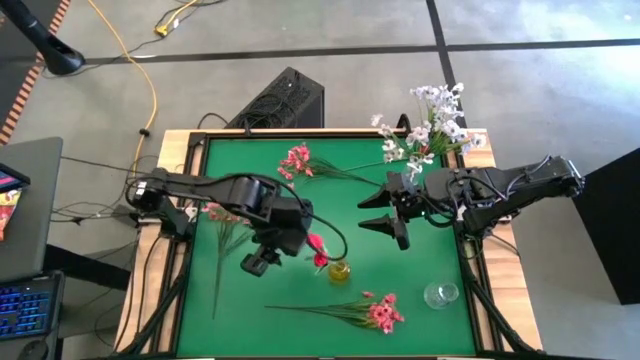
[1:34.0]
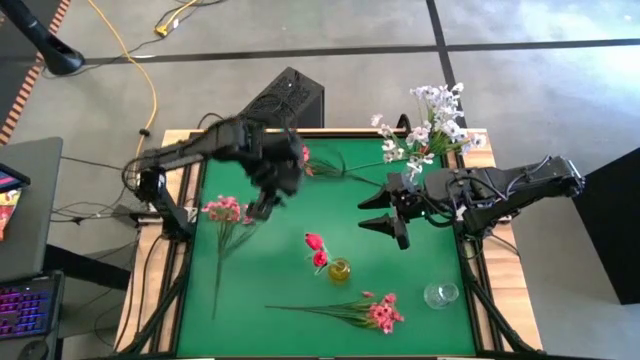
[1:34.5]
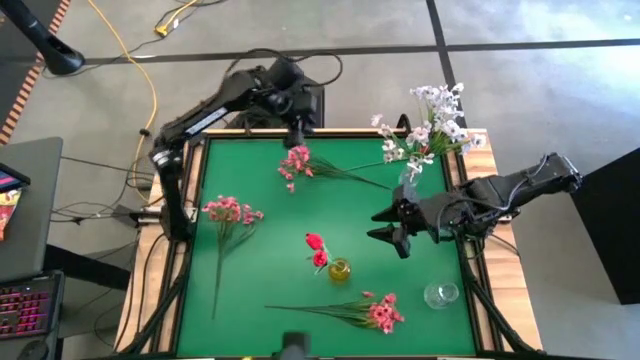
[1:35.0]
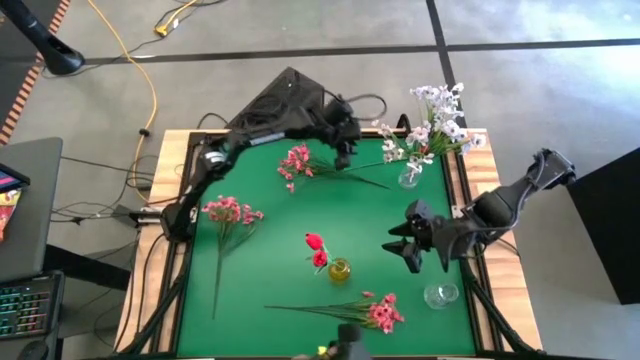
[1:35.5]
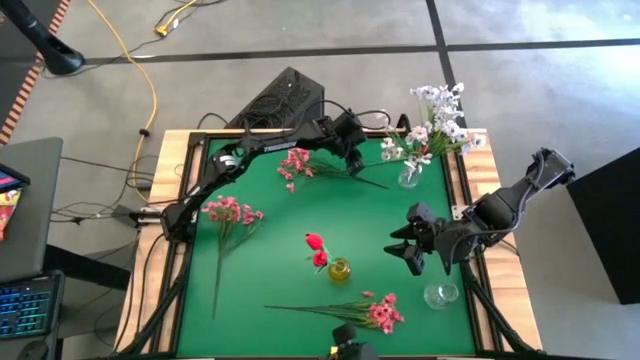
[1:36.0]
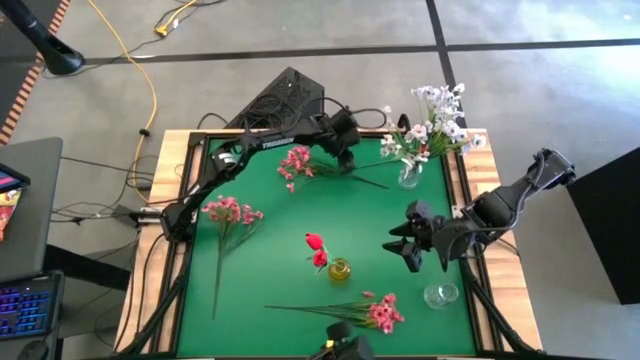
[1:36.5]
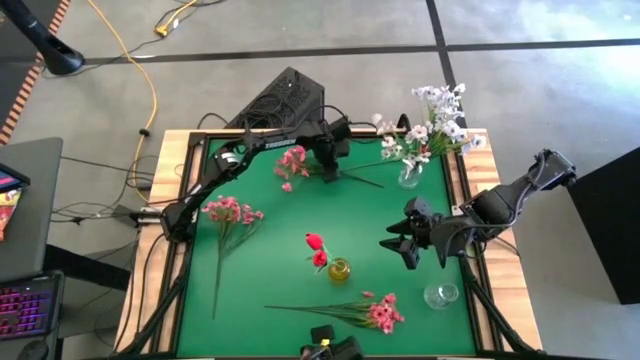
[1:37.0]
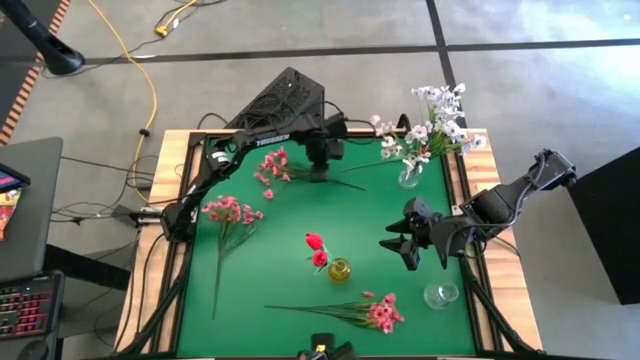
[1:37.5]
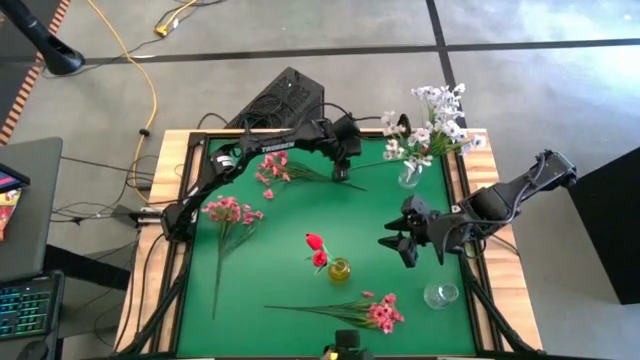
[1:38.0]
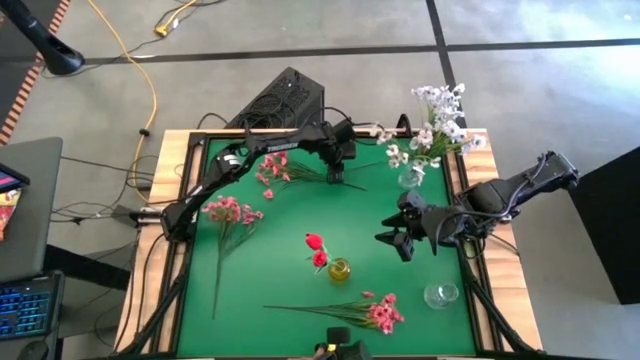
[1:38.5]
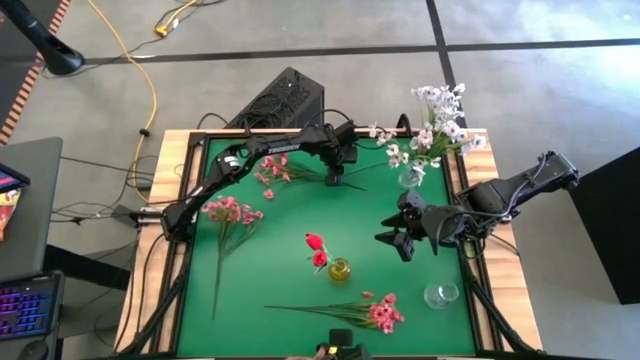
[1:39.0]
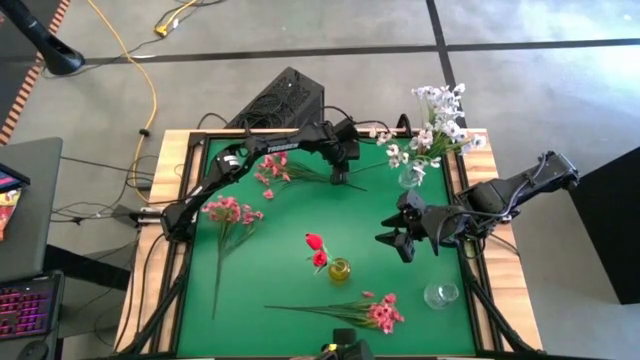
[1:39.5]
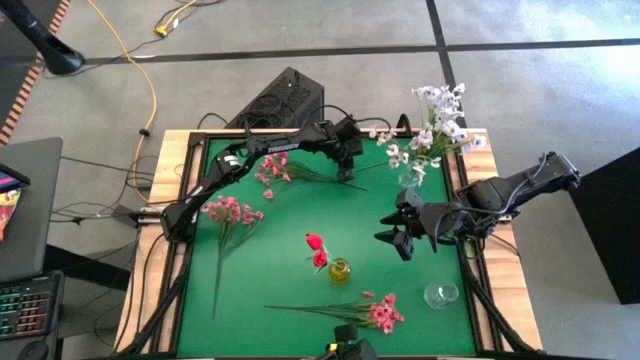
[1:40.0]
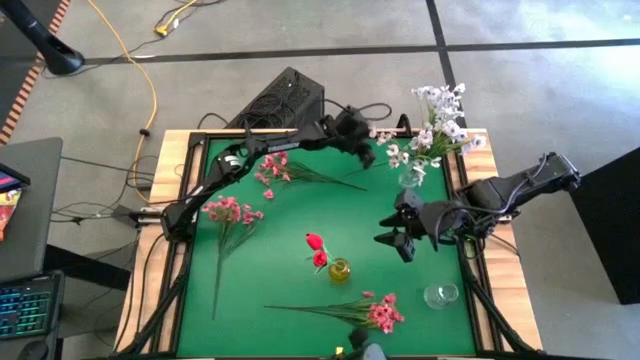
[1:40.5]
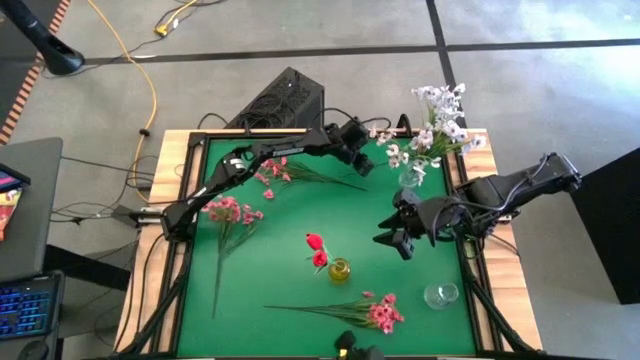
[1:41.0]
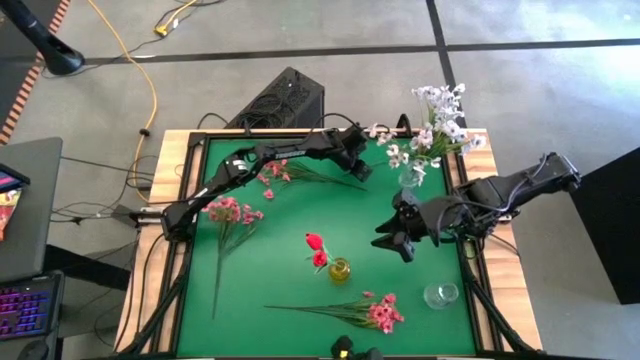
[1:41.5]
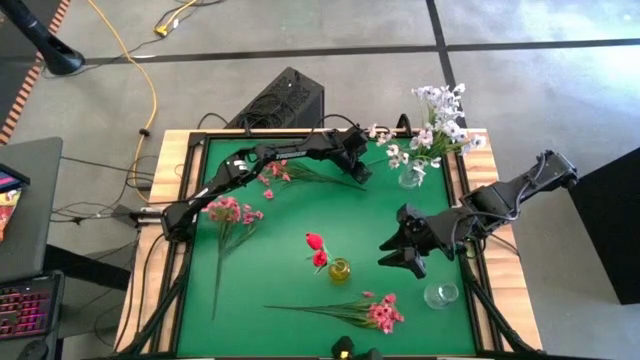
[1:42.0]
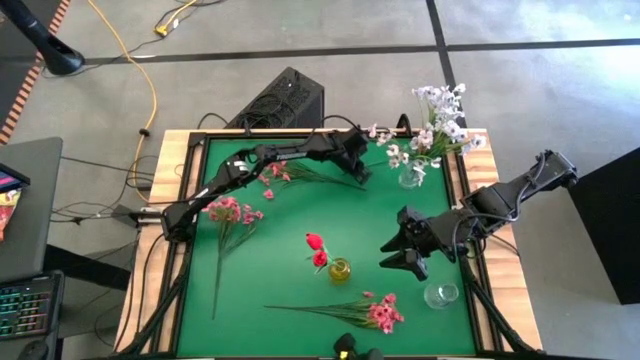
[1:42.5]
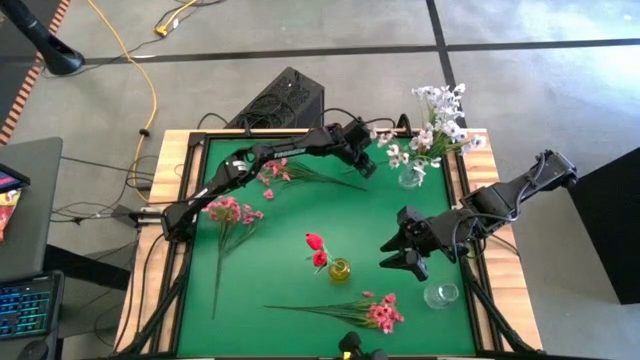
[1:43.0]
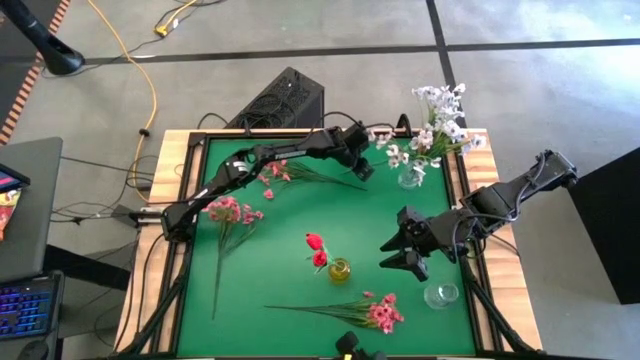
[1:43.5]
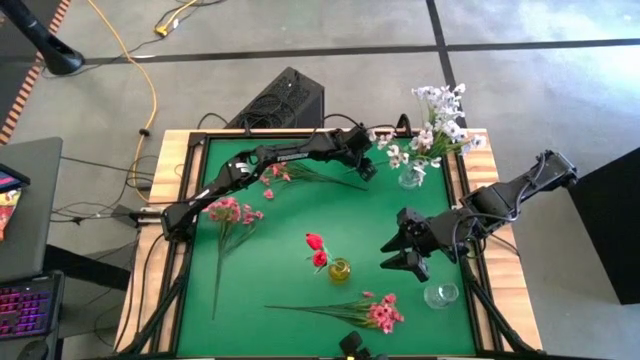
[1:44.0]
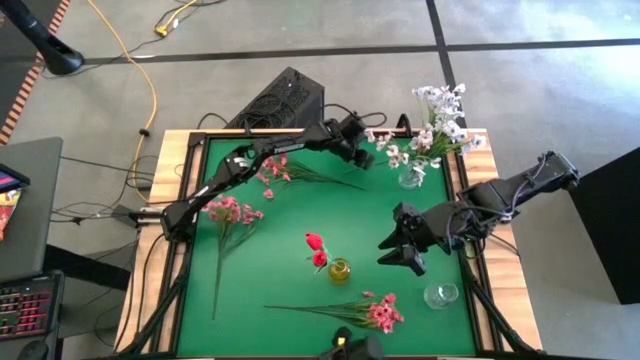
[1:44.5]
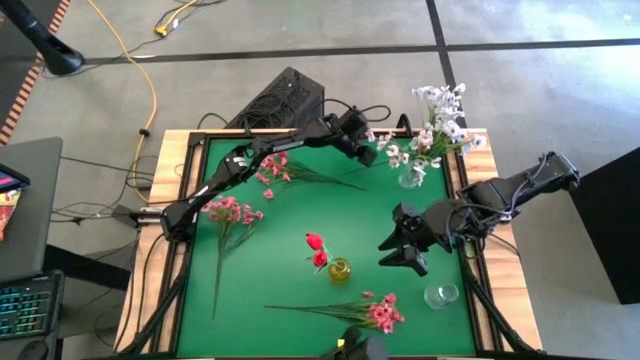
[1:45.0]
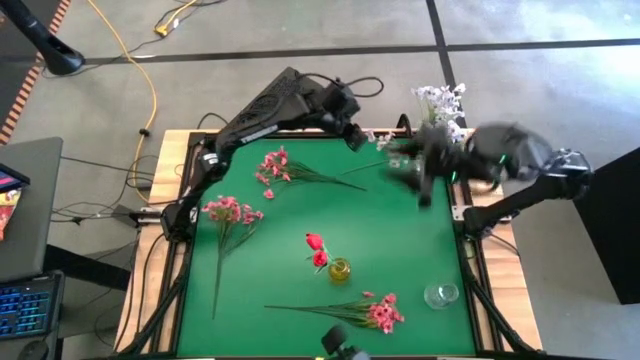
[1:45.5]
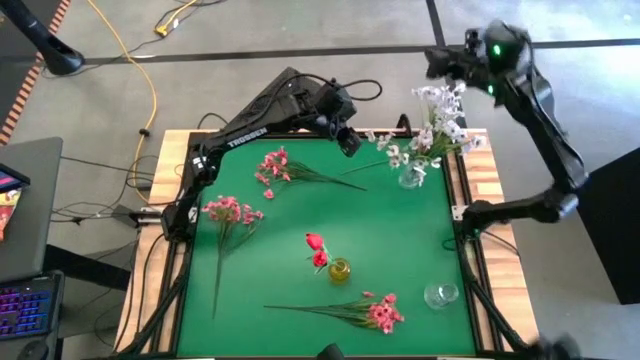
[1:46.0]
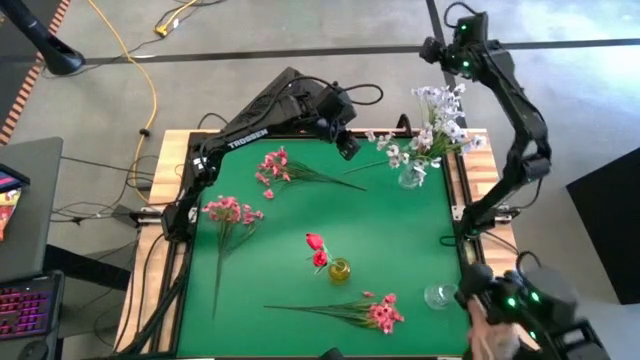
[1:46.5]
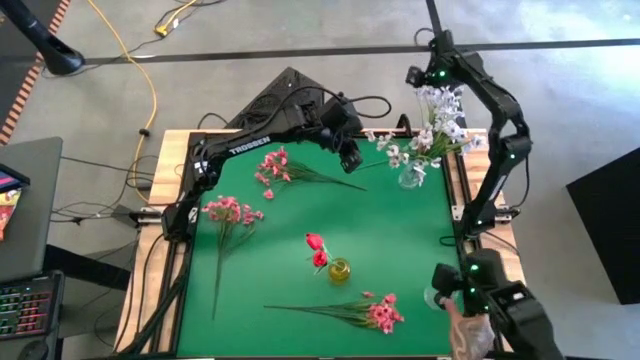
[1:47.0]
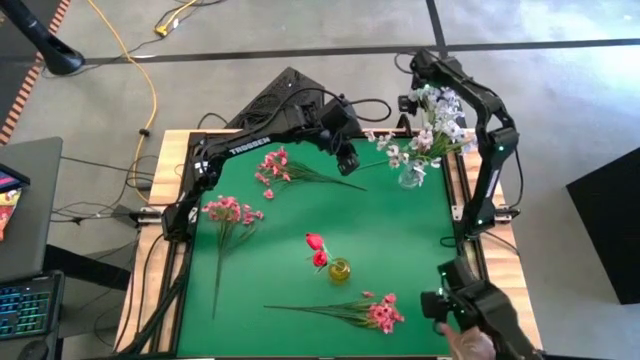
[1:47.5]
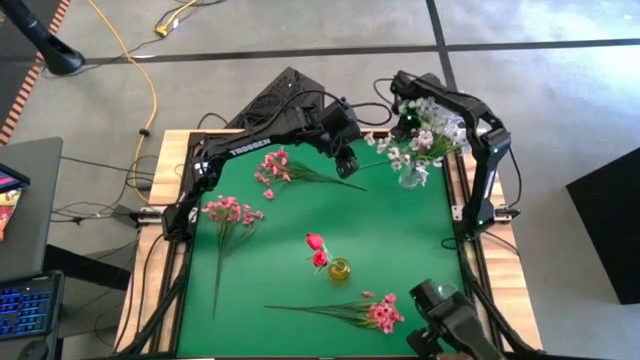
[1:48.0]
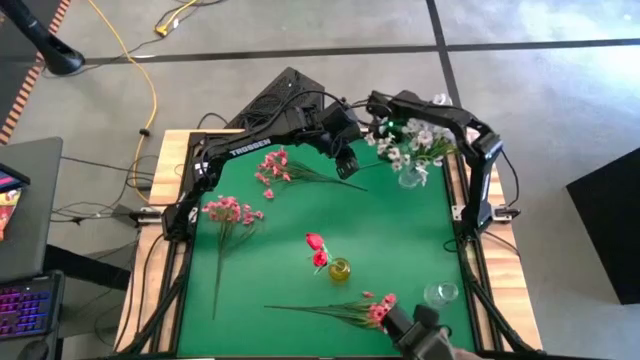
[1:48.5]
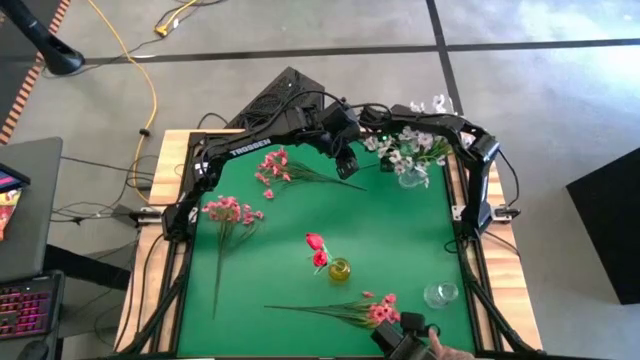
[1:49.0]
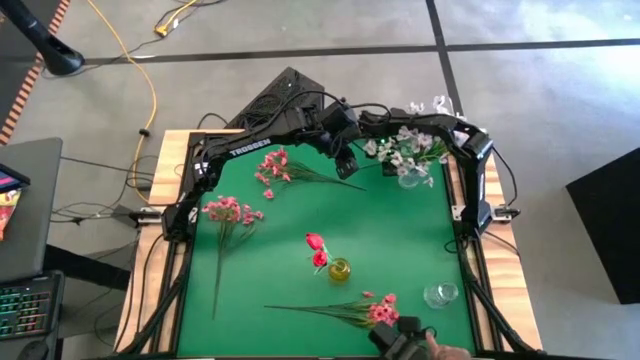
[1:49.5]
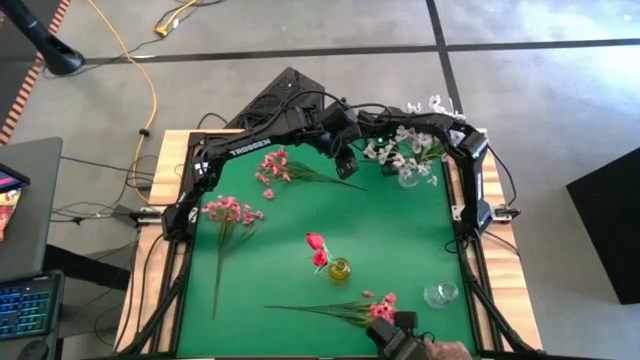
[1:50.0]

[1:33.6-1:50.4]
Task: Sort flowers into vase by color
Put the top right red tulip into the transparent yellow vase

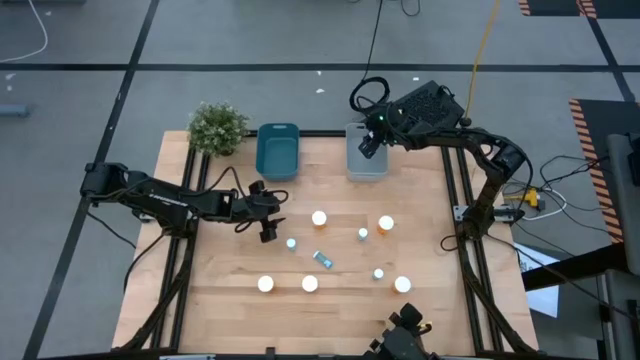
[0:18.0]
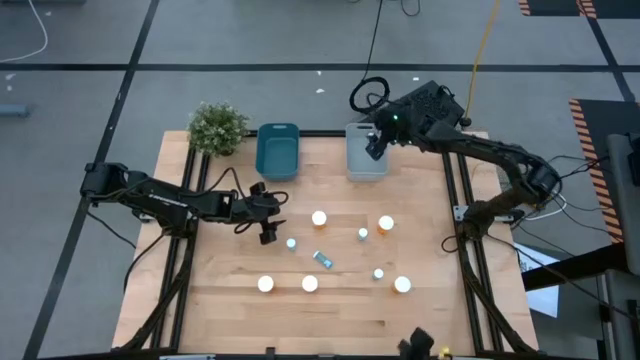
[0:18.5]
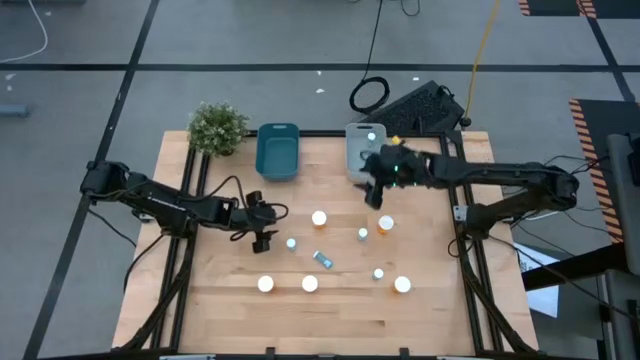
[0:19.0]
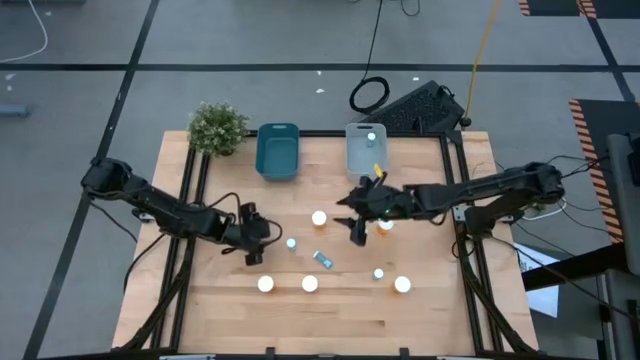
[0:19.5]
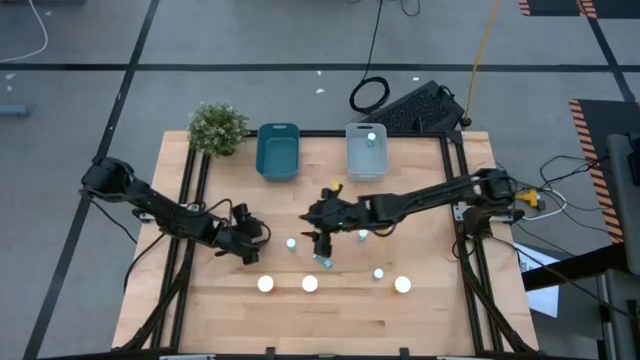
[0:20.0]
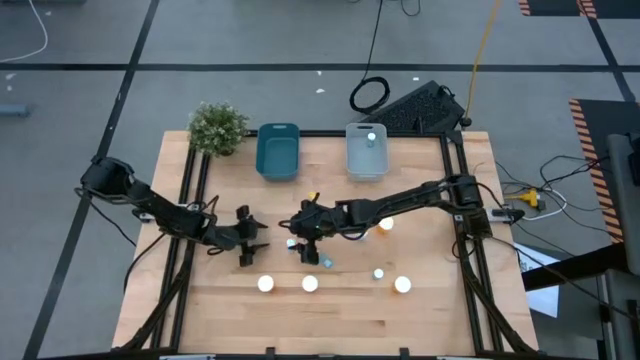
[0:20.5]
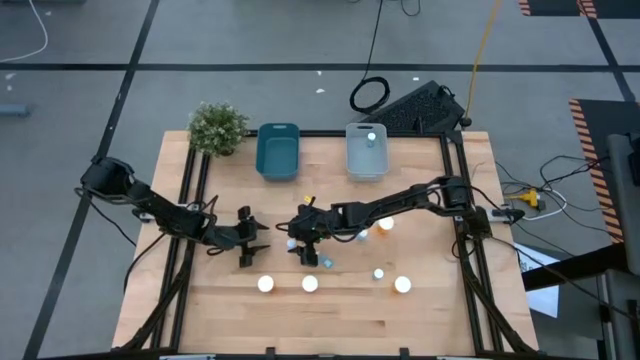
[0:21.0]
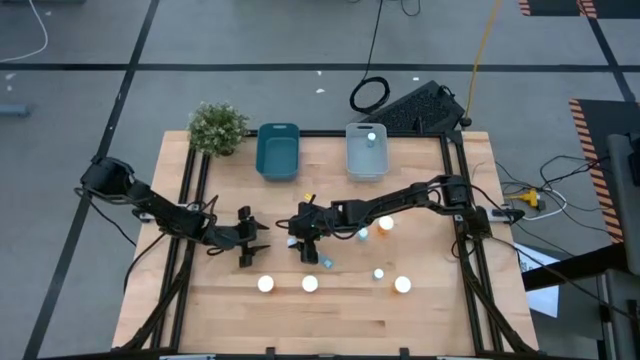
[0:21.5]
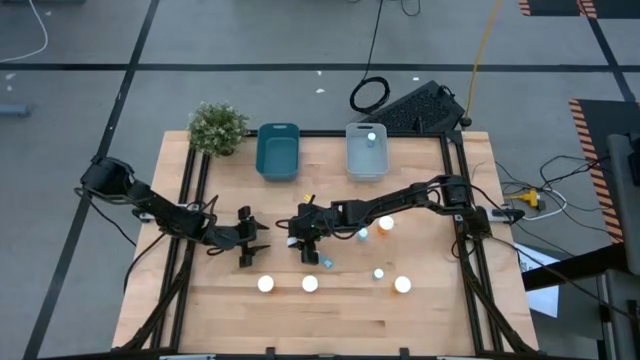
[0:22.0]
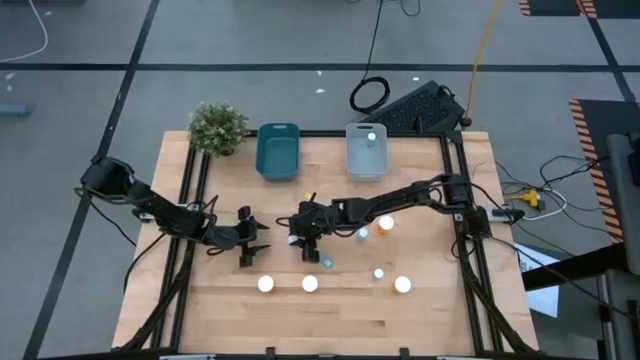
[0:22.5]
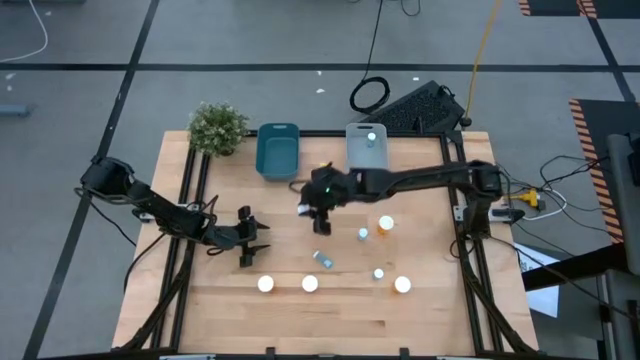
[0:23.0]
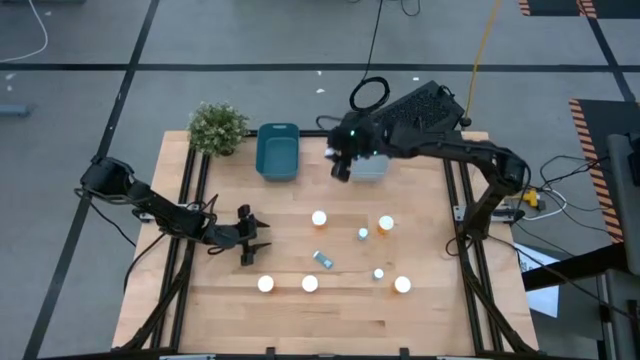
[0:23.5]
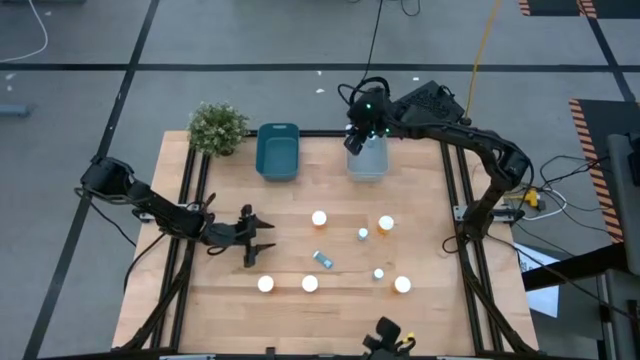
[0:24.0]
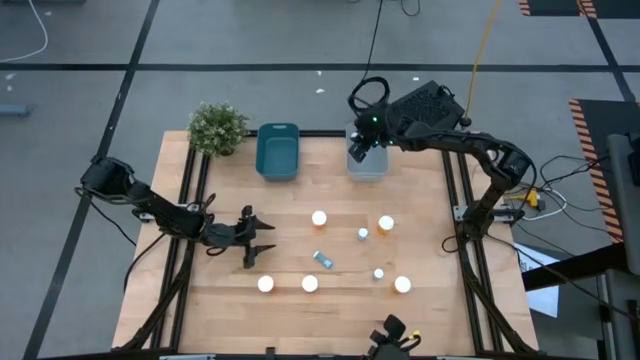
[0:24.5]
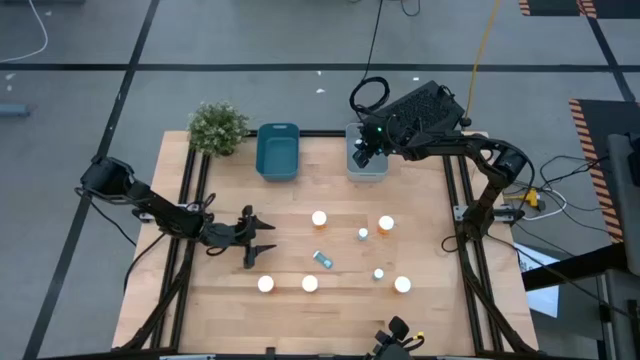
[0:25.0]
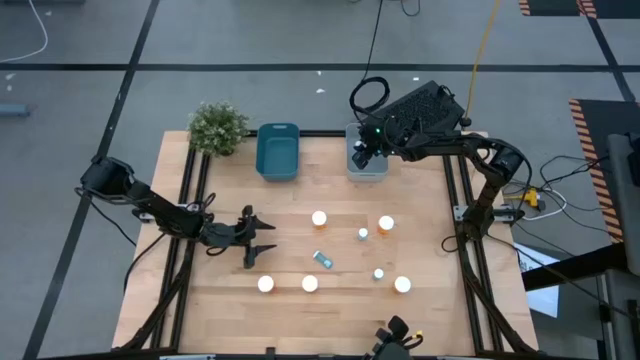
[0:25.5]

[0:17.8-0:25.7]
Task: Pick and place medicine bottles into bin by pill shape (circle, oval)
Put the blue pill bottle into the gray bin
